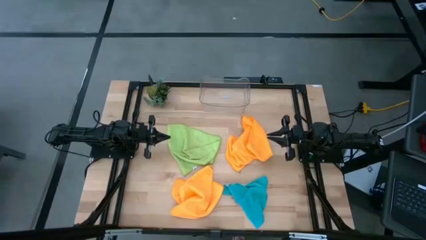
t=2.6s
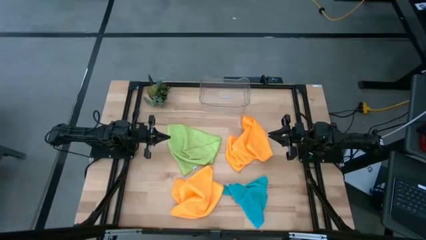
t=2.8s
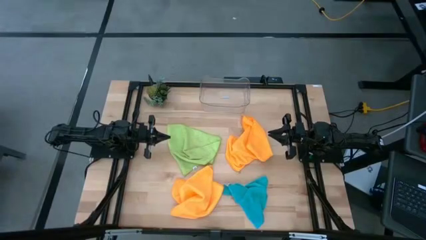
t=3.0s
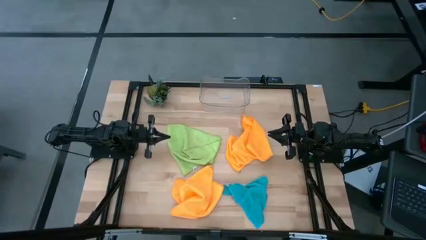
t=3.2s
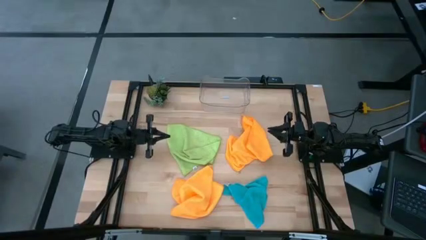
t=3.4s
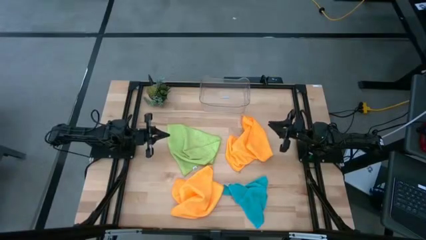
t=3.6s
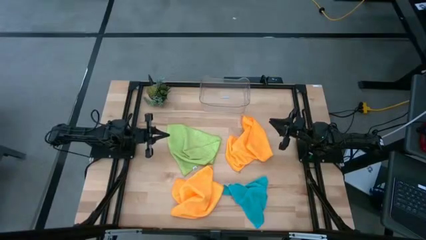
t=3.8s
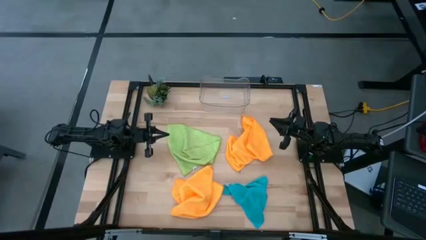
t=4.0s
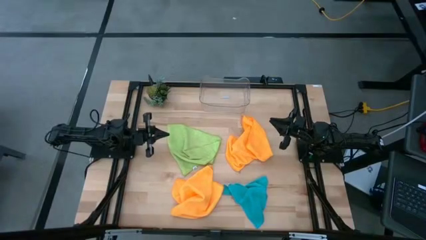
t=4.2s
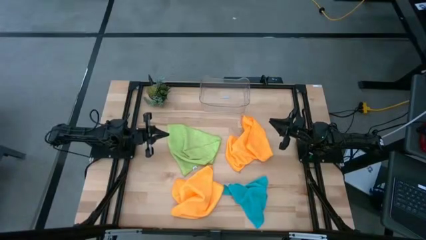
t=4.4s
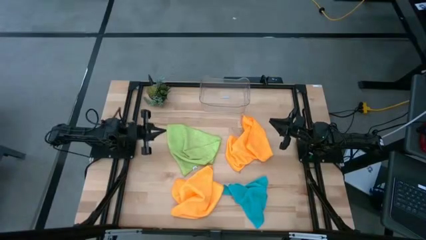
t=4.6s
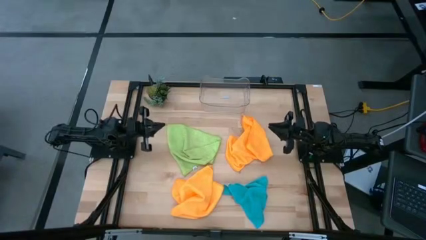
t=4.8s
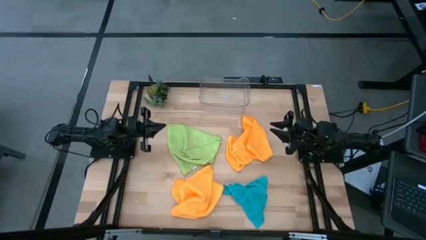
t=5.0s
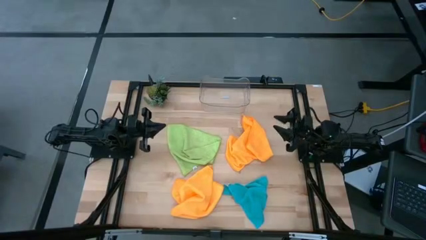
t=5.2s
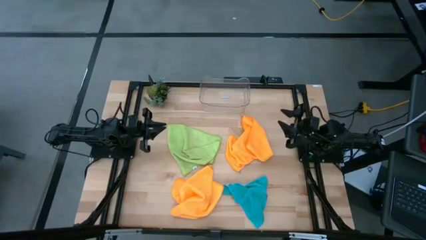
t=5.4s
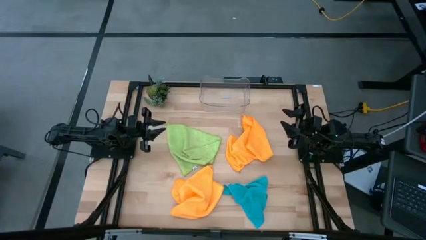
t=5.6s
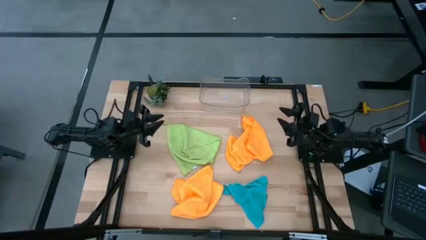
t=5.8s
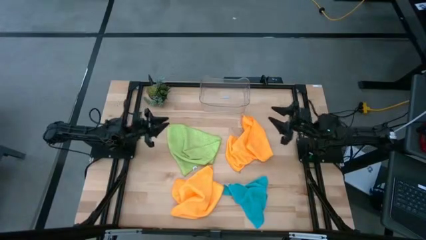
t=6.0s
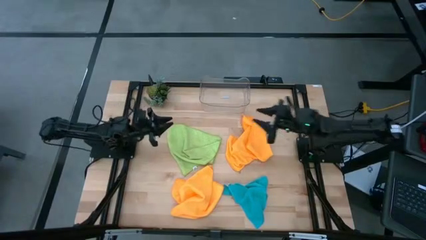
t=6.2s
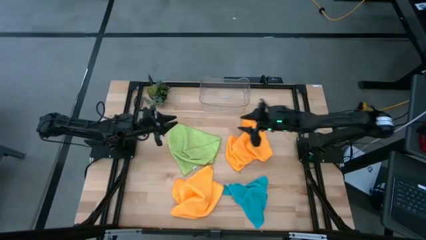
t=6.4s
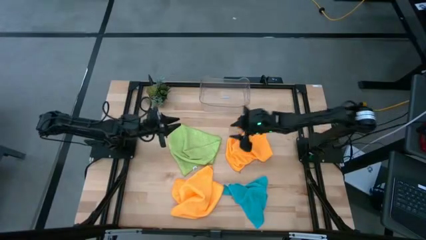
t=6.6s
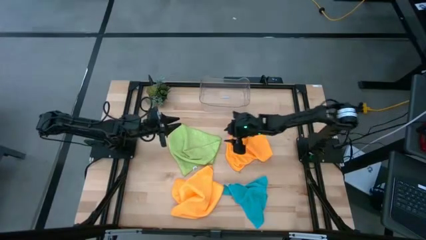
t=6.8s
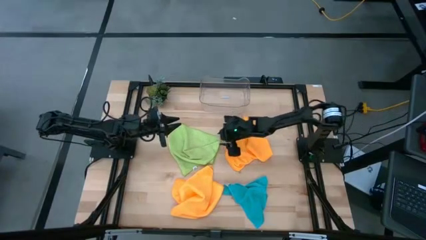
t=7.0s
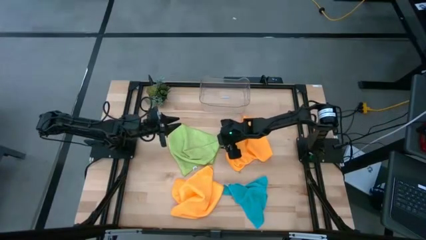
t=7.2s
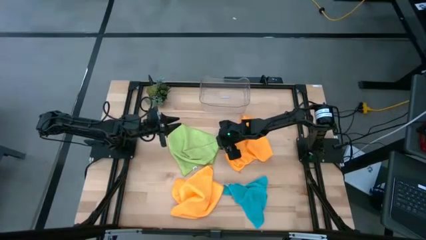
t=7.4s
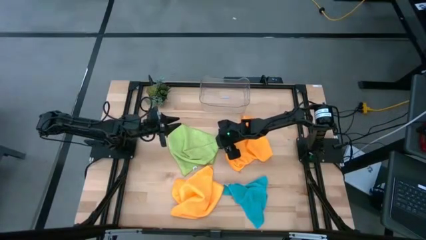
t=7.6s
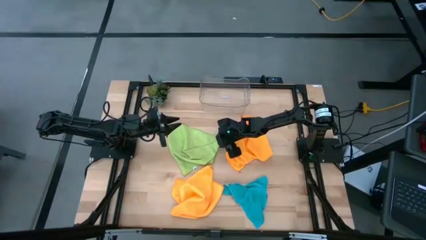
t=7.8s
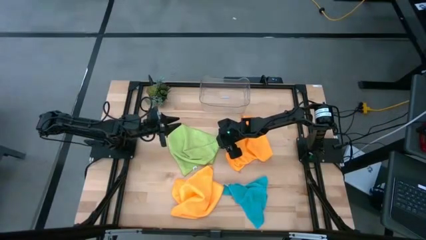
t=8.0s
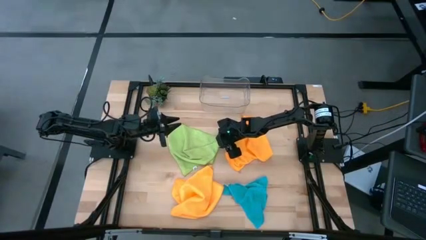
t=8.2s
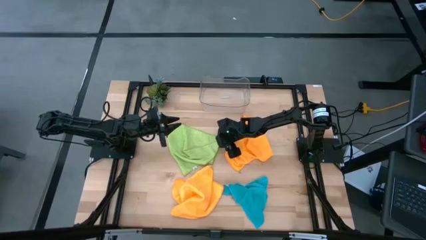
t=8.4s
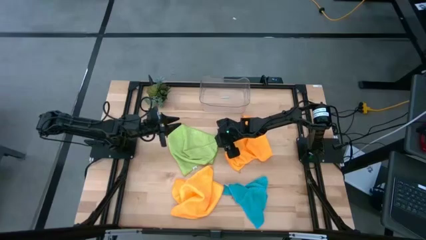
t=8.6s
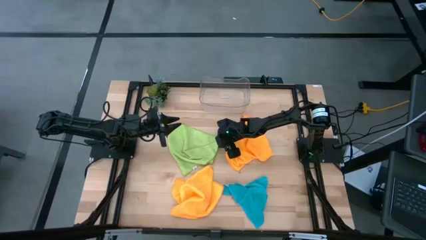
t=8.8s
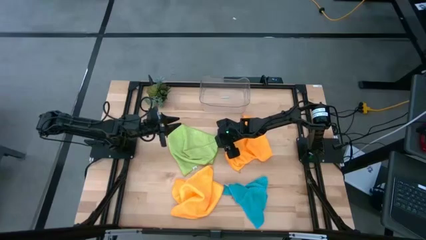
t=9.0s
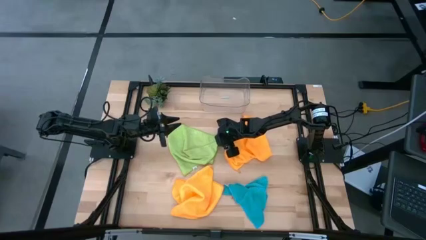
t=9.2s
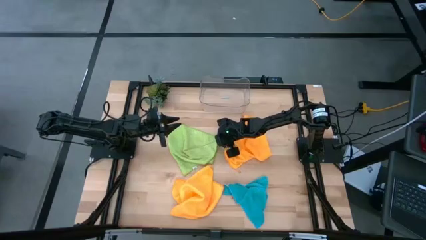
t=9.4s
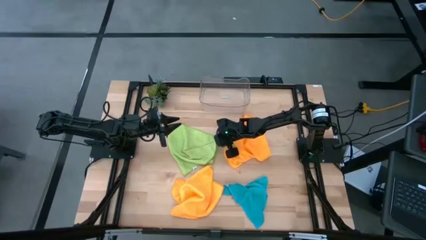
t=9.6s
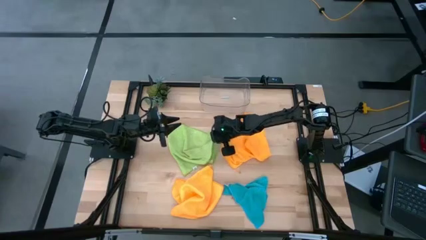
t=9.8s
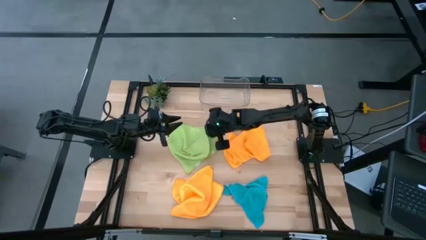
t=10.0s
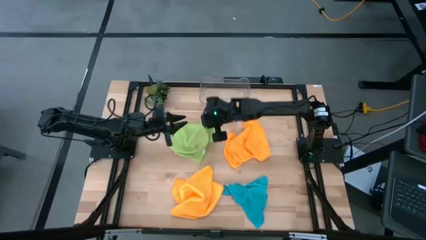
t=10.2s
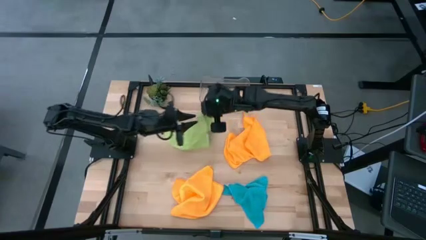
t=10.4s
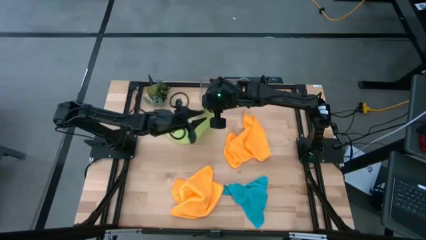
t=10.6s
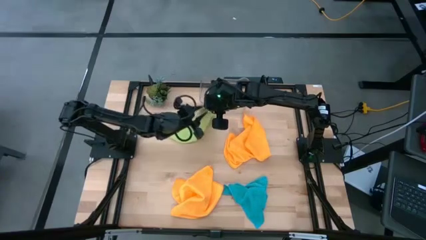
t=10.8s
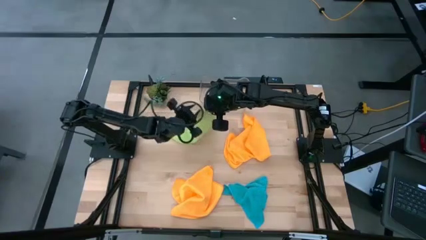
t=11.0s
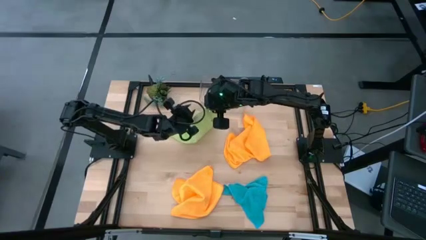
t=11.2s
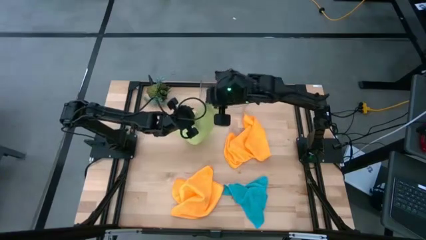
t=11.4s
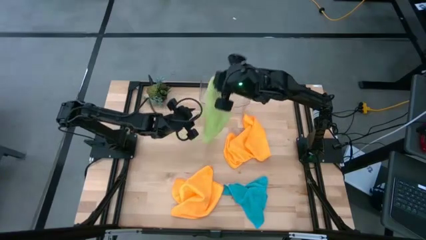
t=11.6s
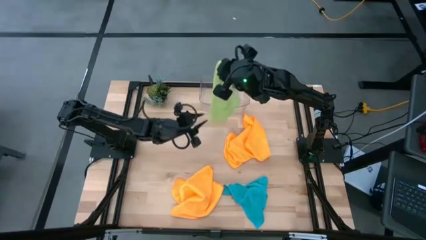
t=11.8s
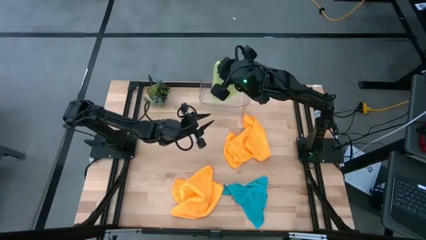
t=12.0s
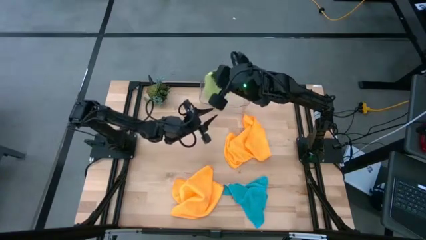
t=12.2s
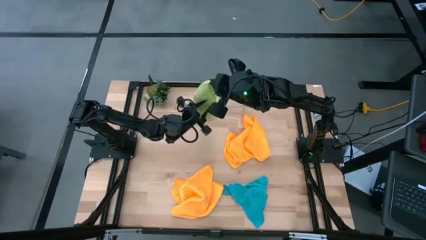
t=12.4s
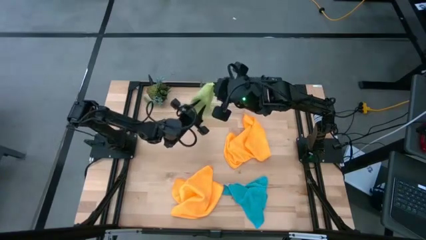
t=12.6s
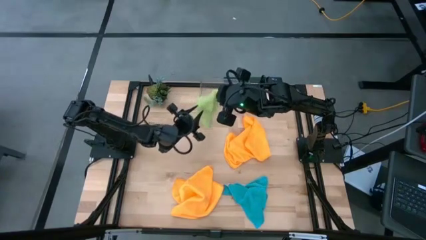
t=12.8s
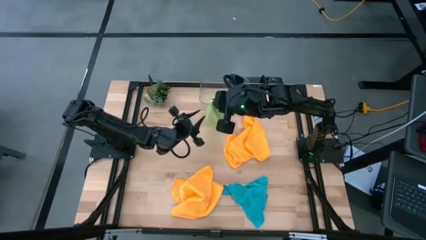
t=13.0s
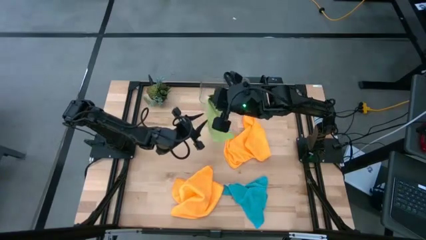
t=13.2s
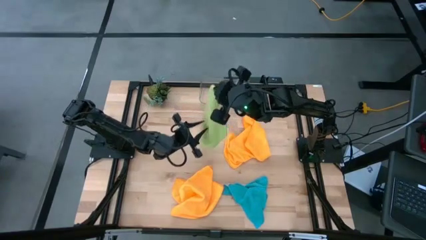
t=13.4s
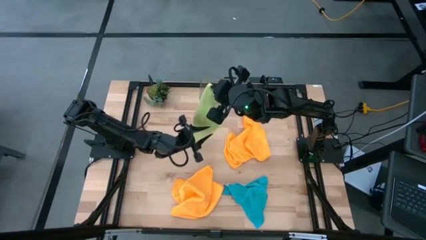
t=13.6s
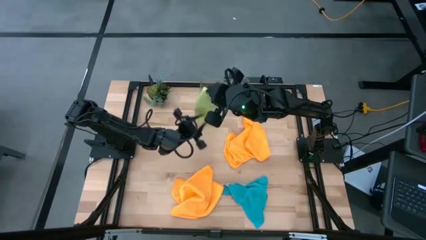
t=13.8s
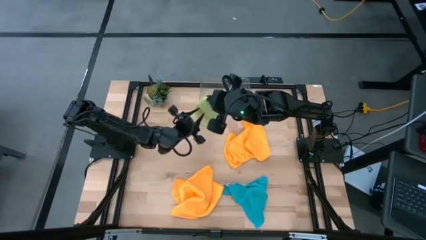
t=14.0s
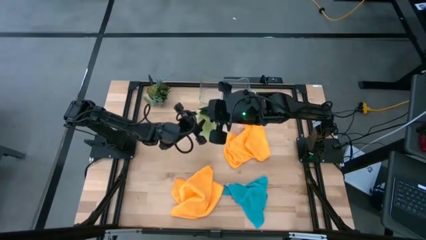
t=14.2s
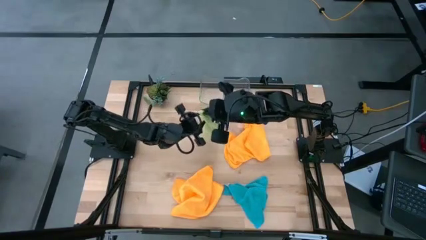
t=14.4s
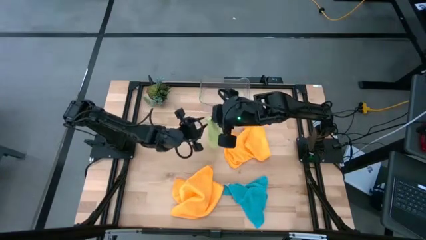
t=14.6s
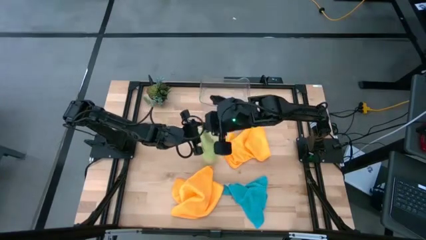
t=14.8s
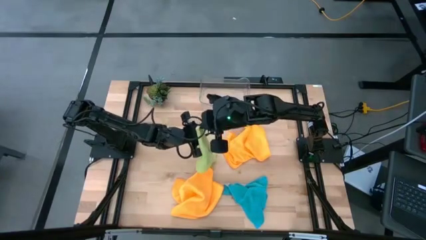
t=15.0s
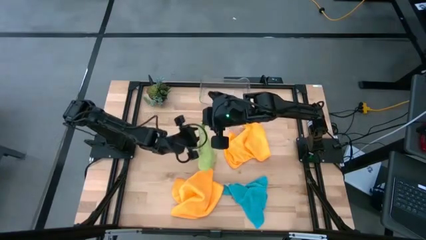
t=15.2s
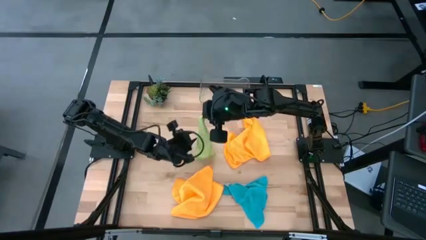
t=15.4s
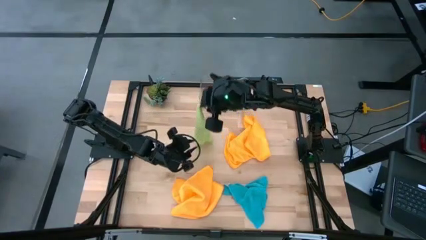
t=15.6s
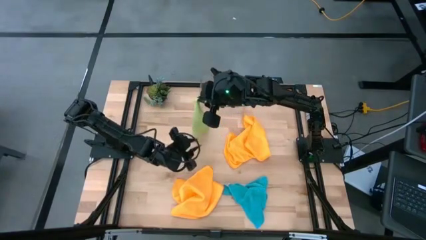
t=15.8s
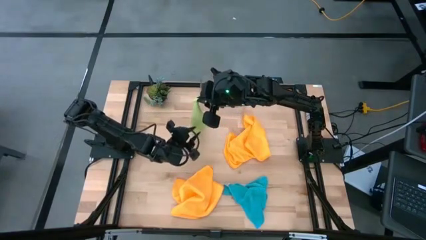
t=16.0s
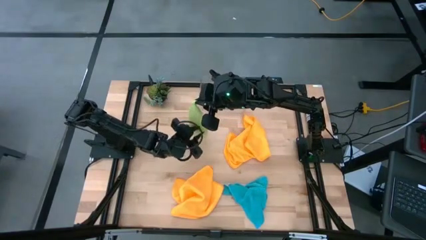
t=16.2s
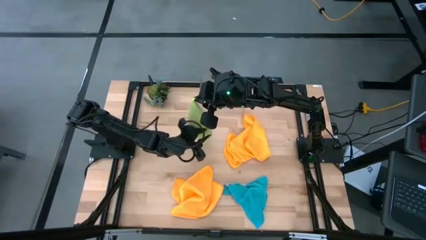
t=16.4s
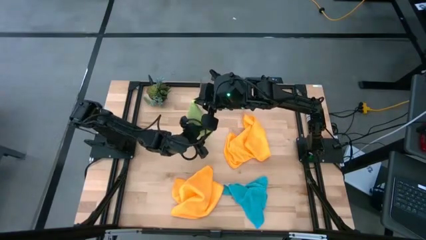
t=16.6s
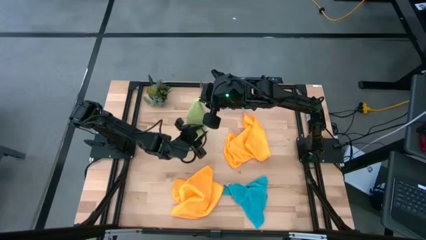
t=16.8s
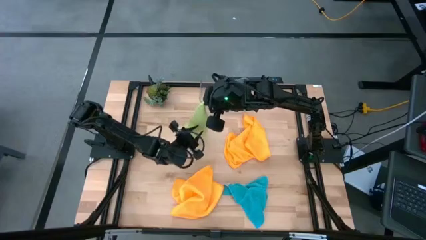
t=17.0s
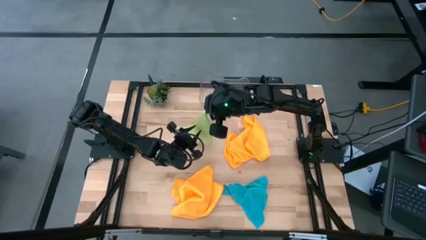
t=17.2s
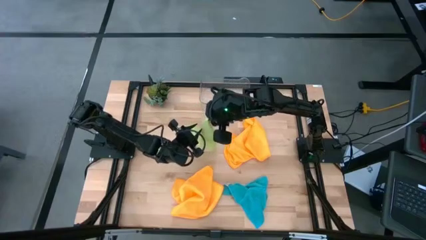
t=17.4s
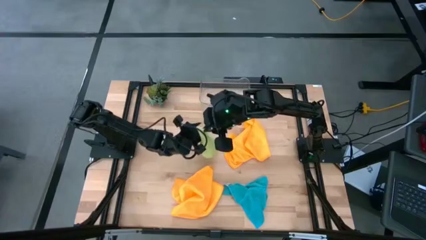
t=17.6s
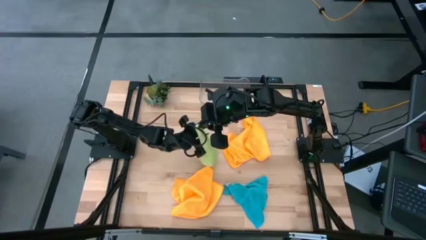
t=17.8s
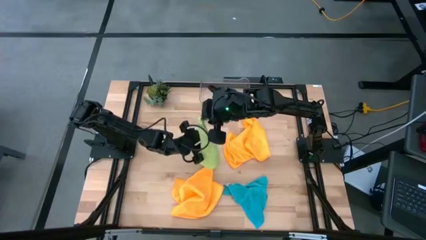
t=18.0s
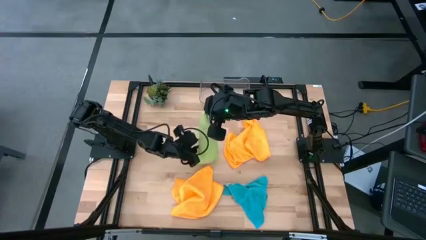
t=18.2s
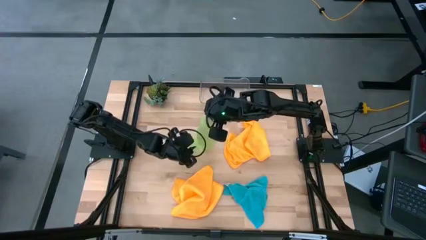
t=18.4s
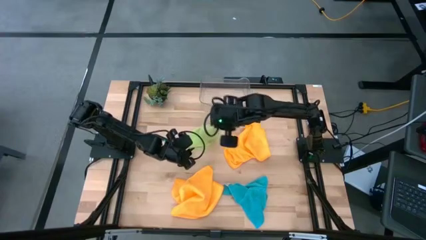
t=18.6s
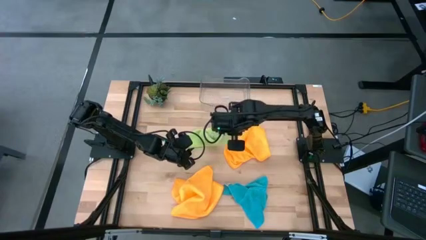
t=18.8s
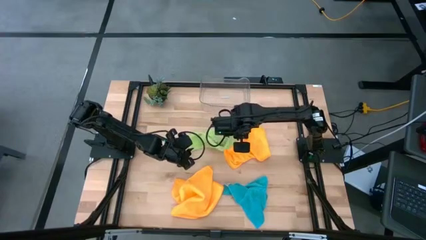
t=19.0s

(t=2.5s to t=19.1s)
Task: Fold microfiber towels
Fold the green microfiber cloth
